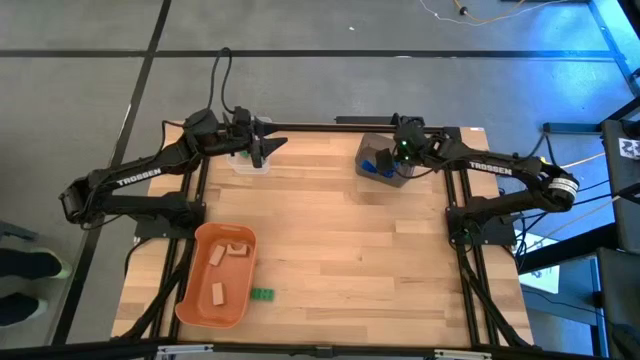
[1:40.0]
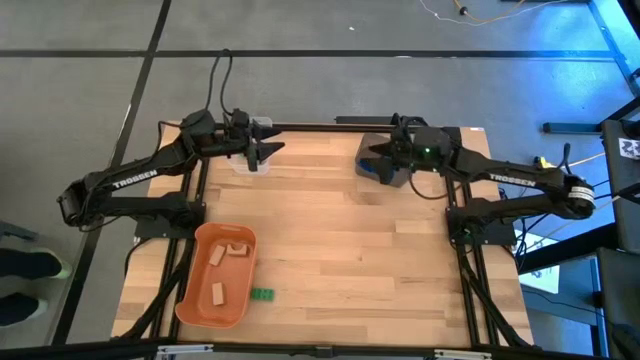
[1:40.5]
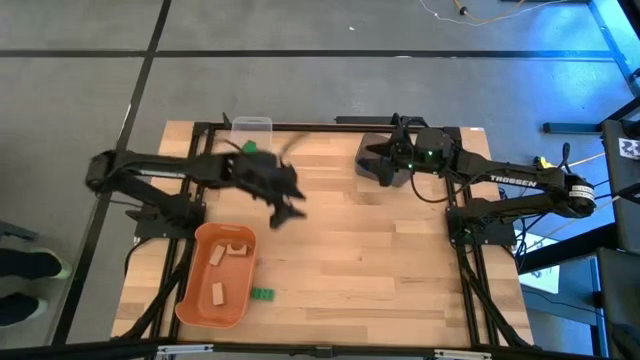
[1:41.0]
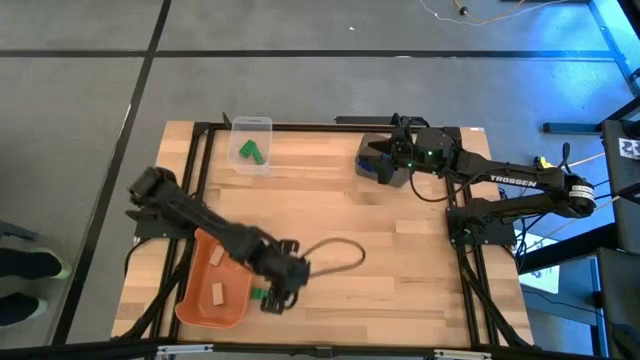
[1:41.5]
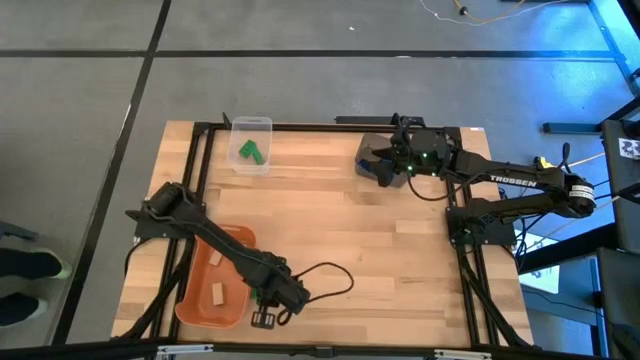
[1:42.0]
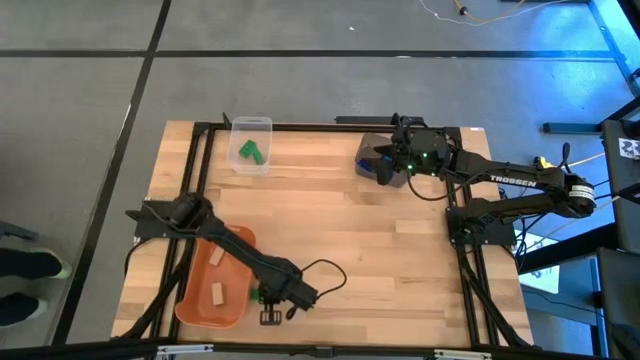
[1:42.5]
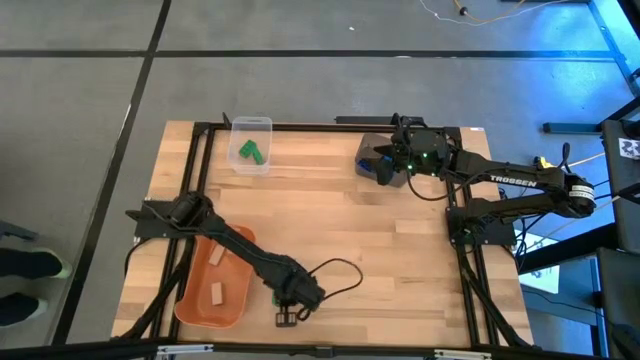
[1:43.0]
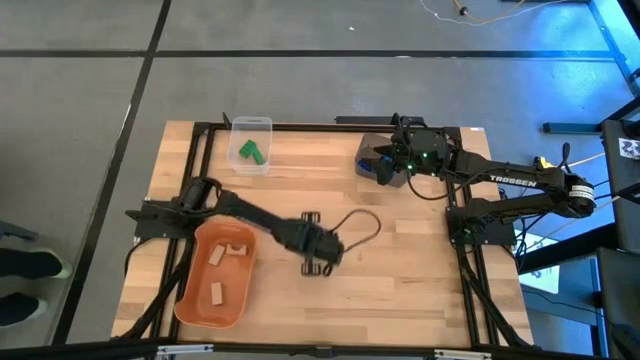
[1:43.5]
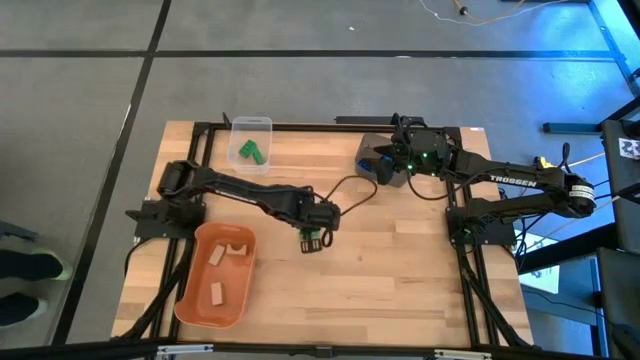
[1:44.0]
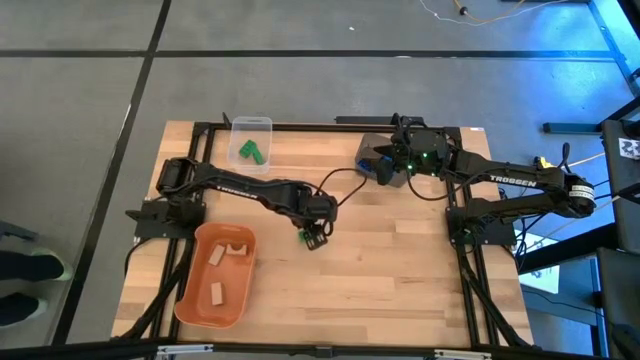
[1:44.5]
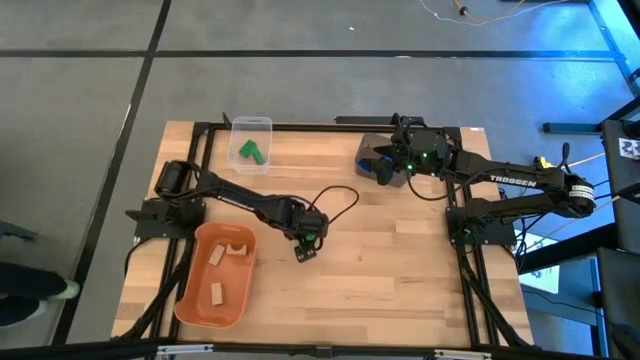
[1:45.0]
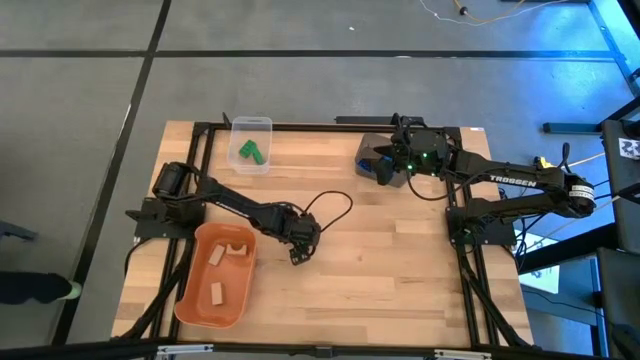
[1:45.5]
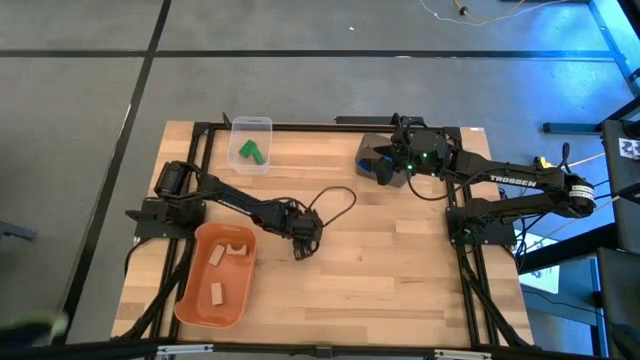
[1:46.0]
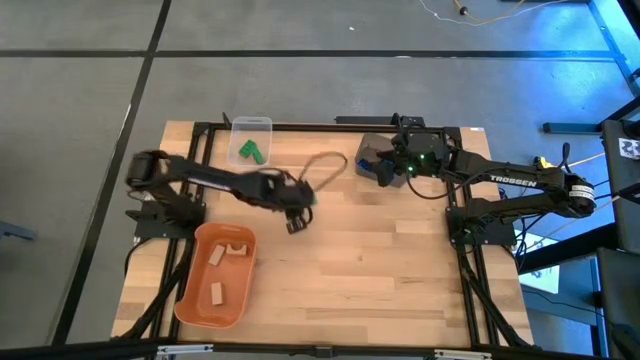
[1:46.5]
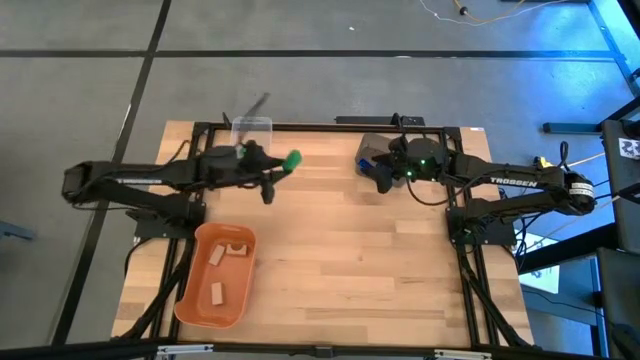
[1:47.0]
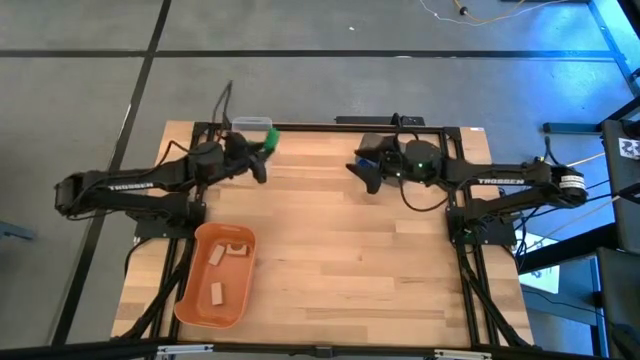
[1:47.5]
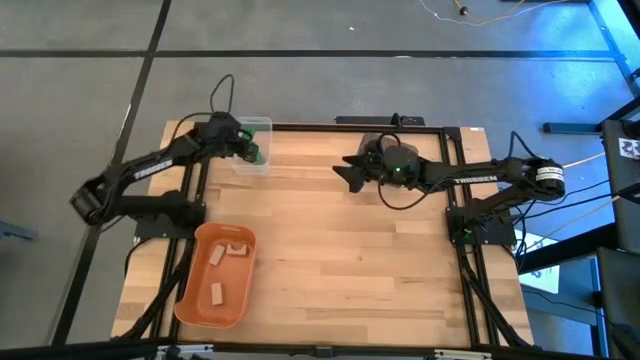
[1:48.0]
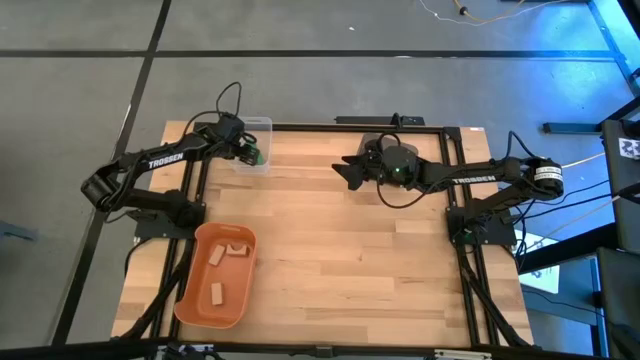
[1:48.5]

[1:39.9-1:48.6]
Task: Sort & place blocks by color
Put the green game piece into the transparent bin

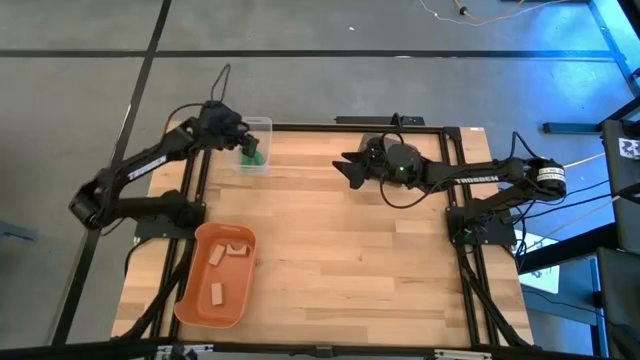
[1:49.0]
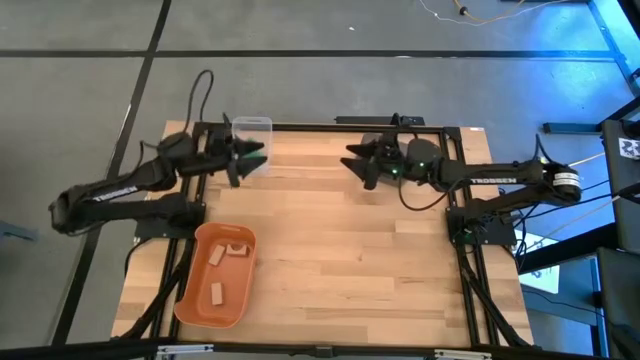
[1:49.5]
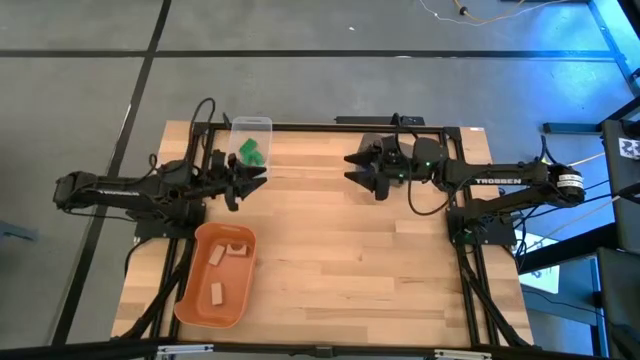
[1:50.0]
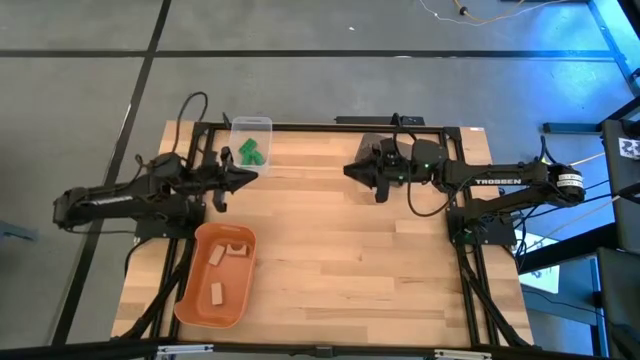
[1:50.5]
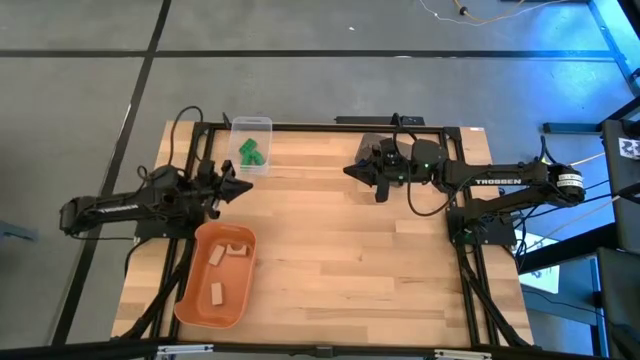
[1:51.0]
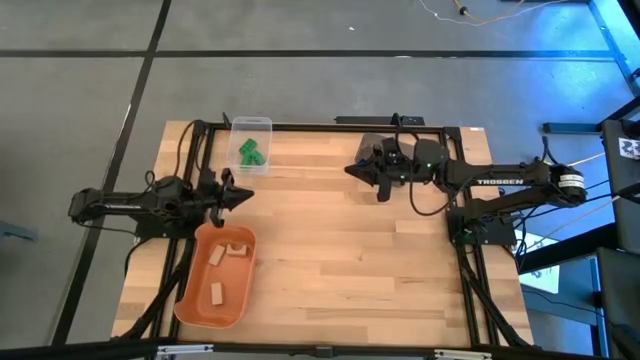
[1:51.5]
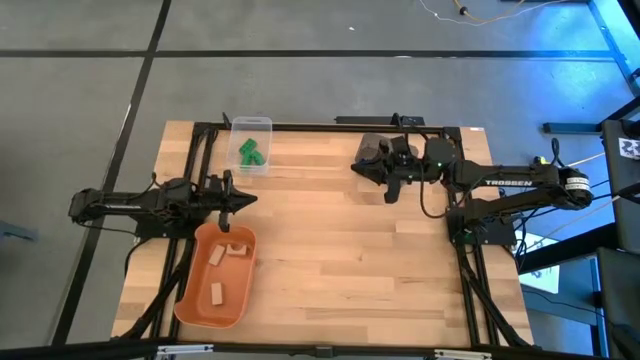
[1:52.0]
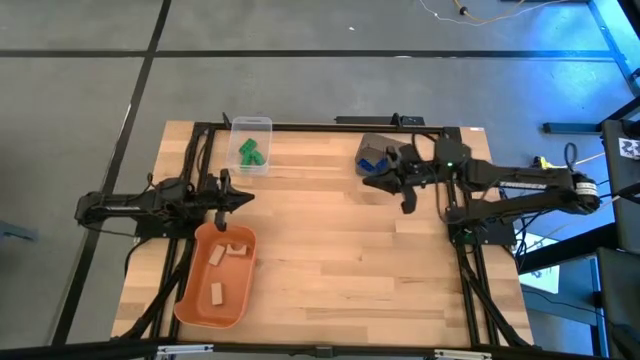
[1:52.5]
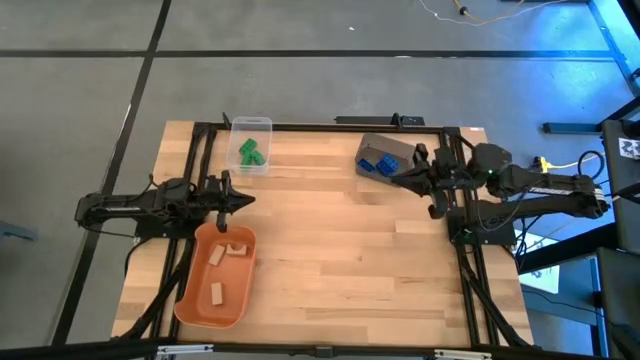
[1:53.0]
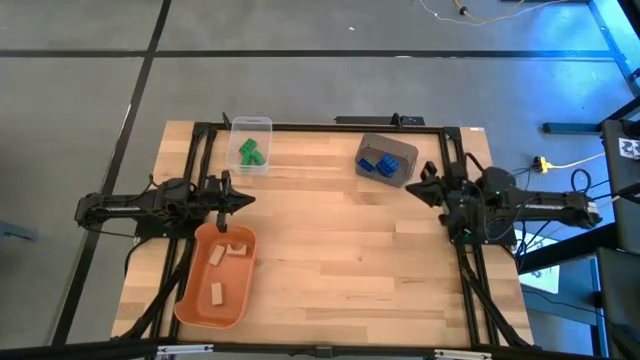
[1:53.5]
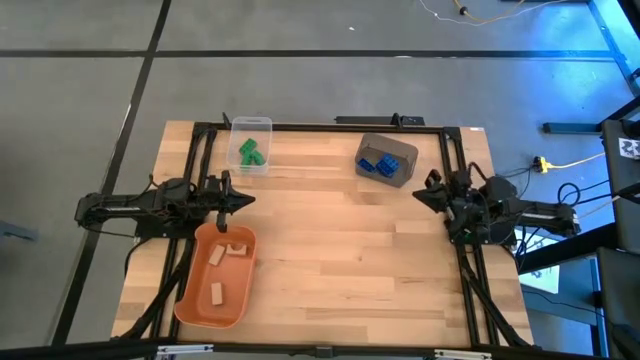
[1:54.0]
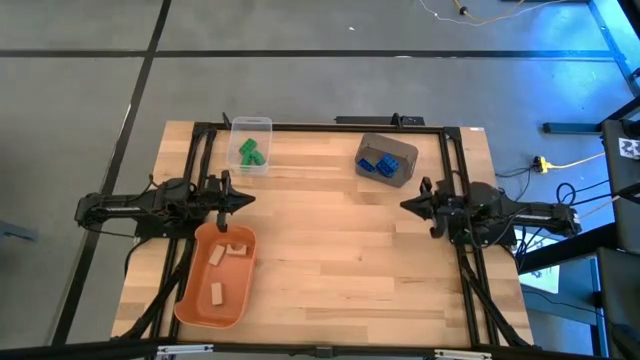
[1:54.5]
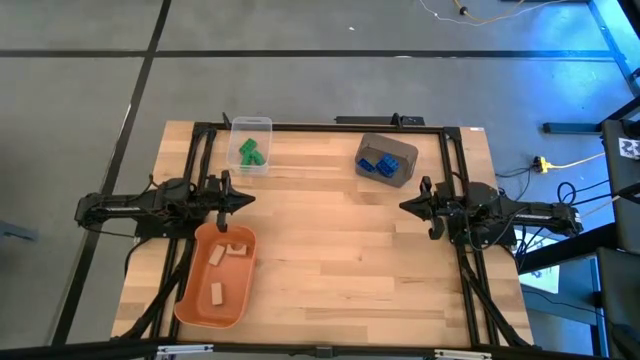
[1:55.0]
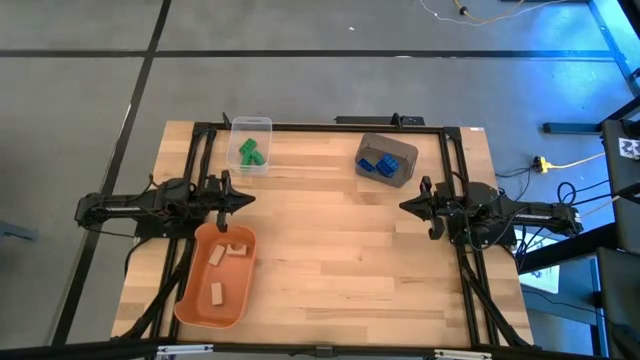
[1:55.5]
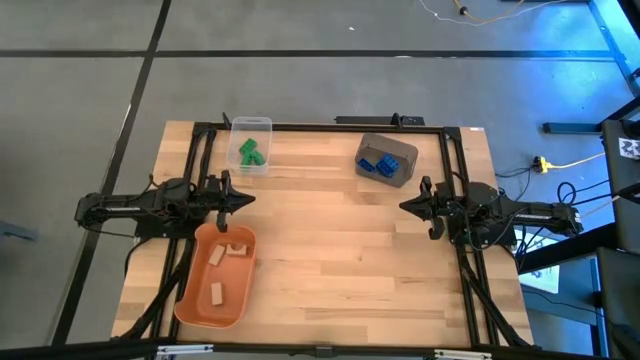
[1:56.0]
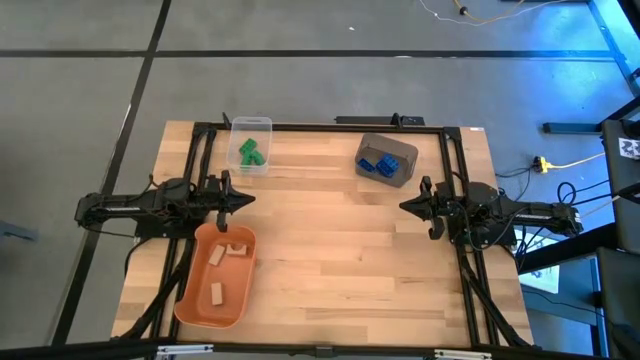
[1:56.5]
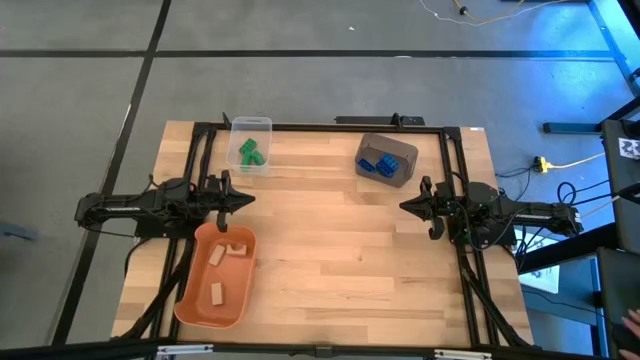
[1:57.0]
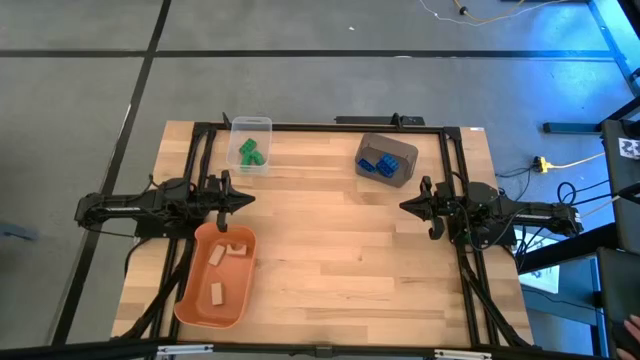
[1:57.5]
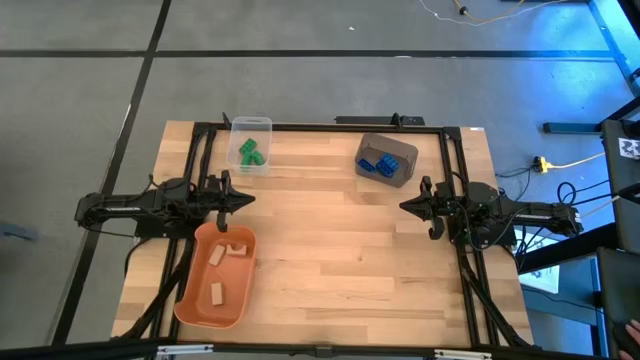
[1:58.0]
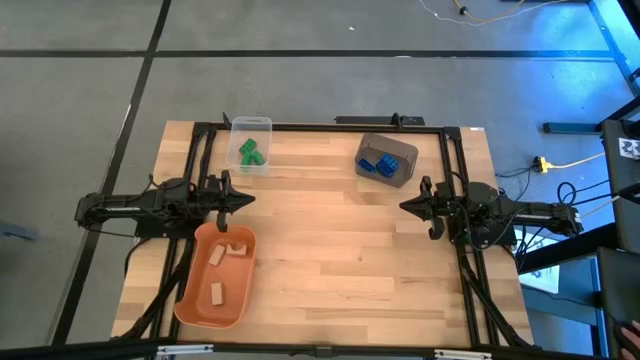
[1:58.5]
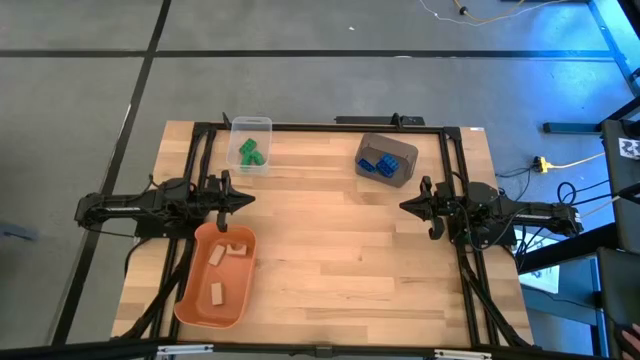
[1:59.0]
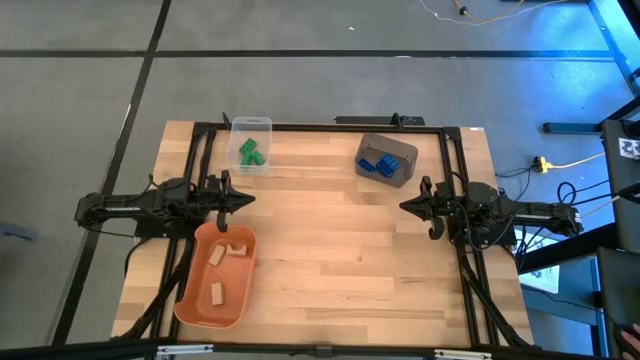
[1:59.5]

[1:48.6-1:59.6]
Return to Home Position

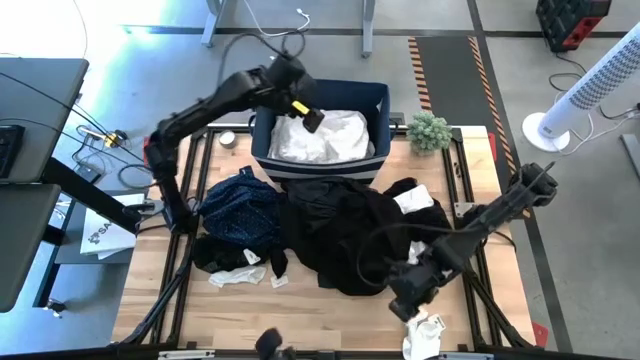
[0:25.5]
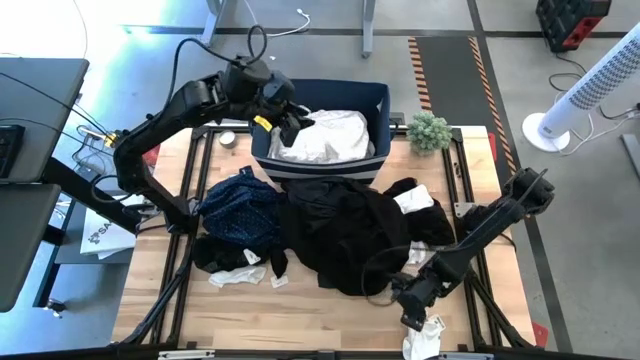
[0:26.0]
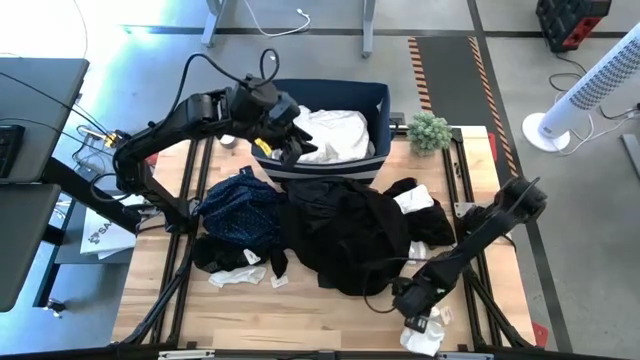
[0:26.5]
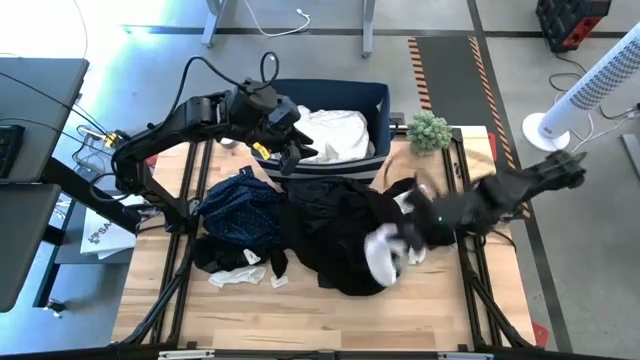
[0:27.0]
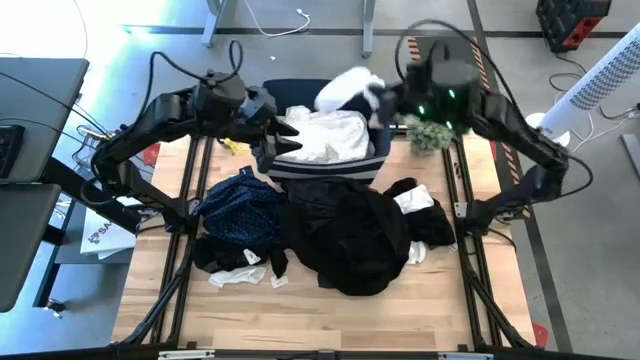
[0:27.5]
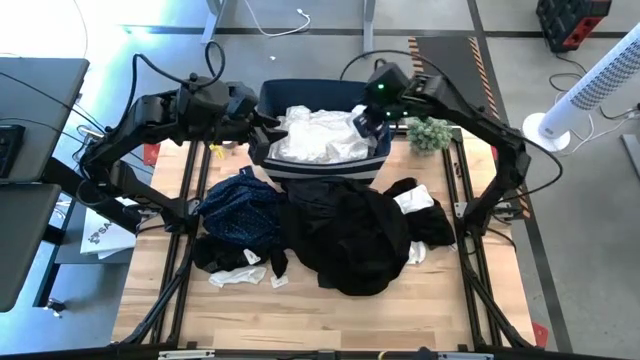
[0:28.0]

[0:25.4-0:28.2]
Task: Sort clothes
Put the bottom white sock into the blue bin
